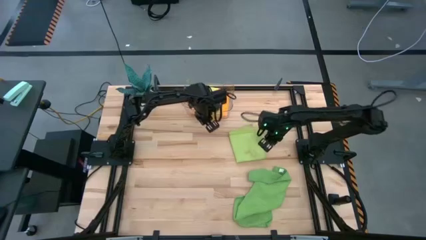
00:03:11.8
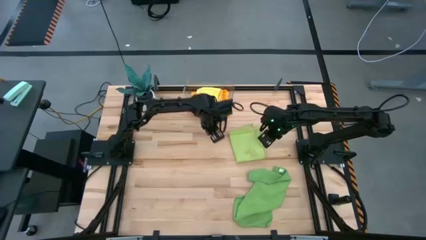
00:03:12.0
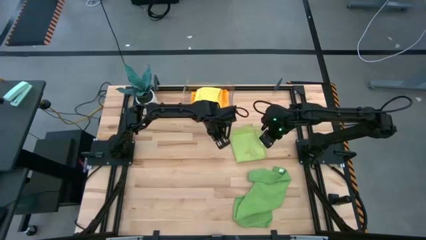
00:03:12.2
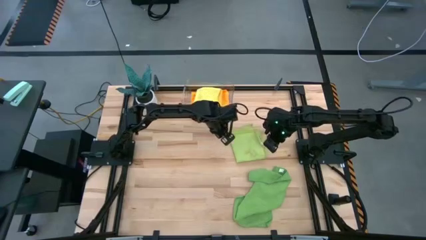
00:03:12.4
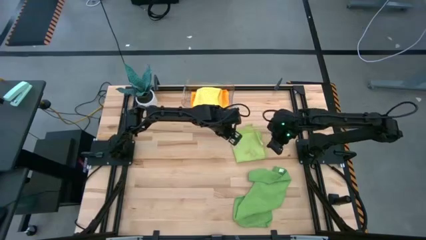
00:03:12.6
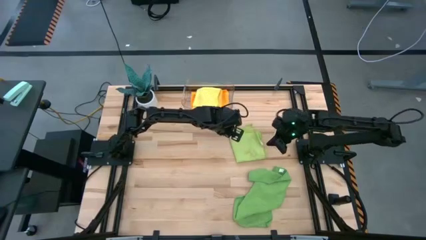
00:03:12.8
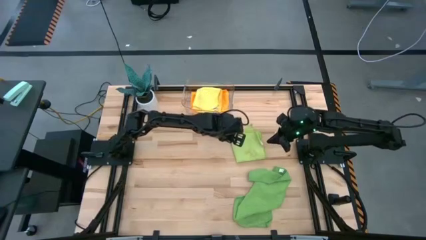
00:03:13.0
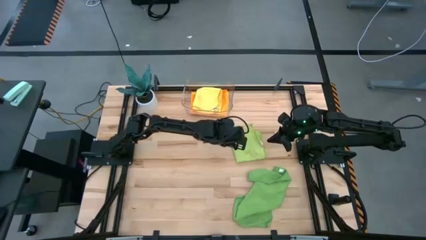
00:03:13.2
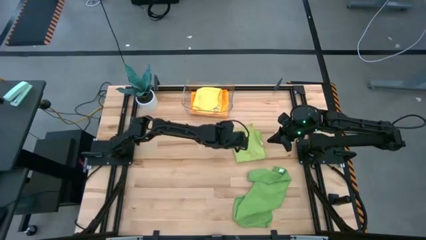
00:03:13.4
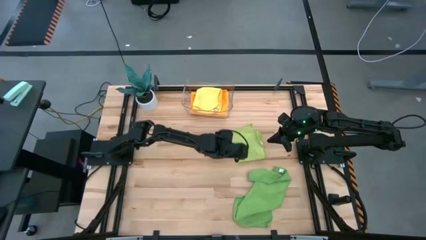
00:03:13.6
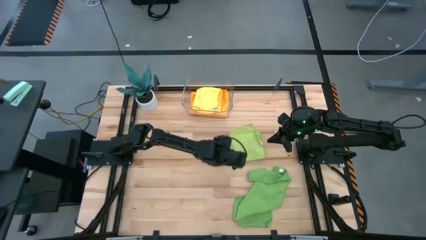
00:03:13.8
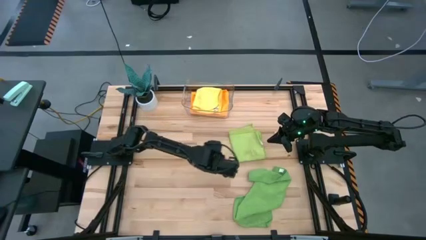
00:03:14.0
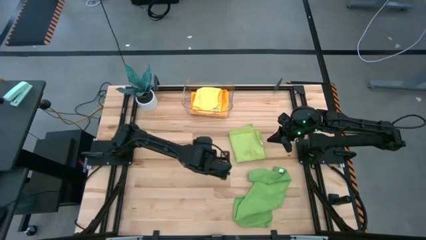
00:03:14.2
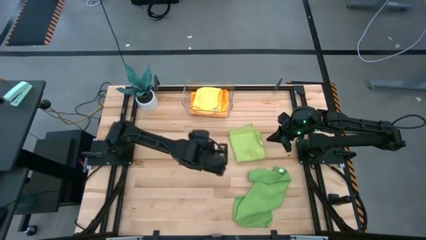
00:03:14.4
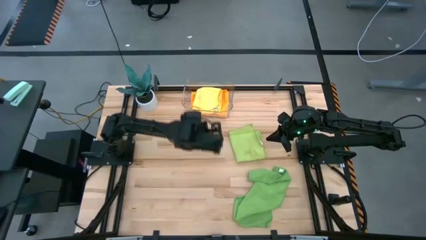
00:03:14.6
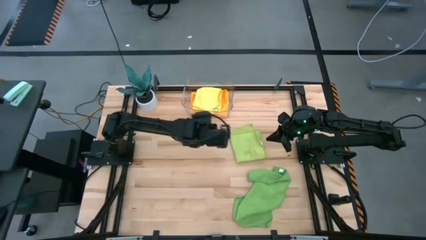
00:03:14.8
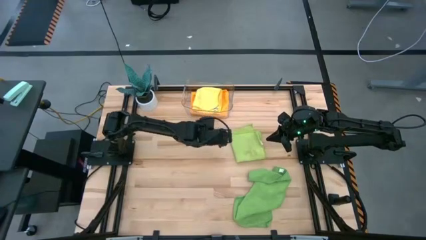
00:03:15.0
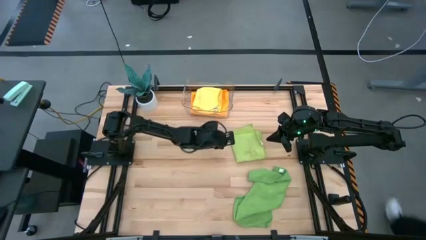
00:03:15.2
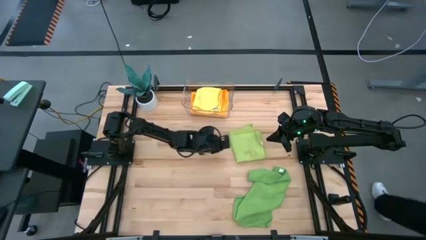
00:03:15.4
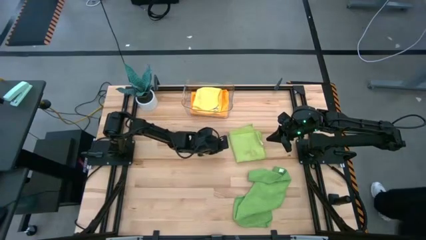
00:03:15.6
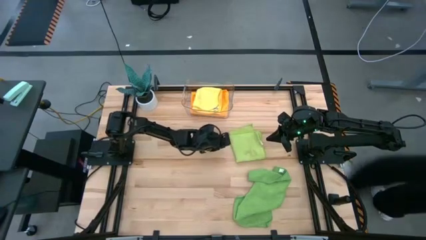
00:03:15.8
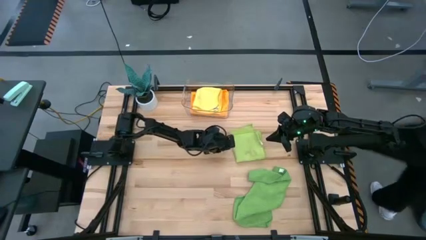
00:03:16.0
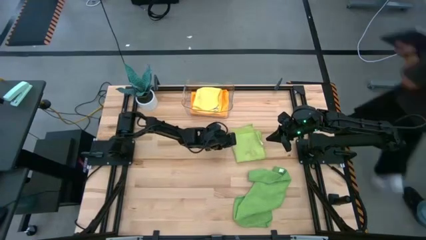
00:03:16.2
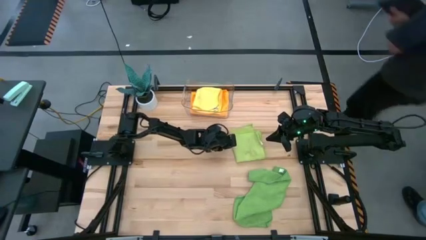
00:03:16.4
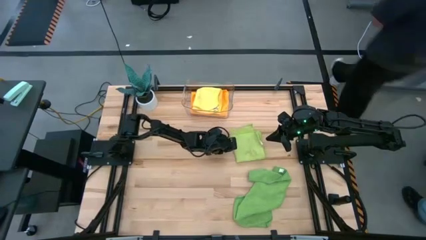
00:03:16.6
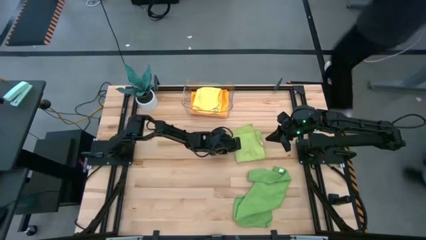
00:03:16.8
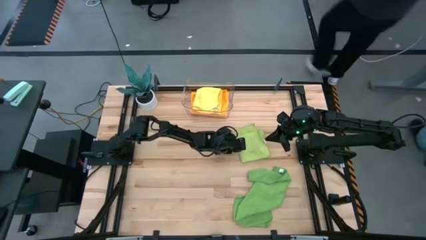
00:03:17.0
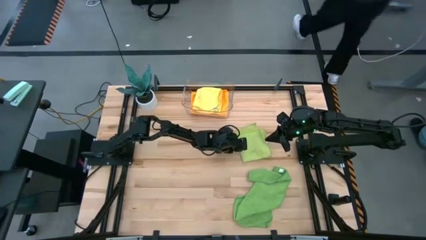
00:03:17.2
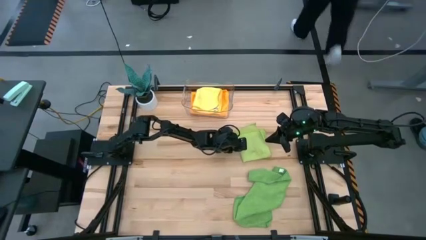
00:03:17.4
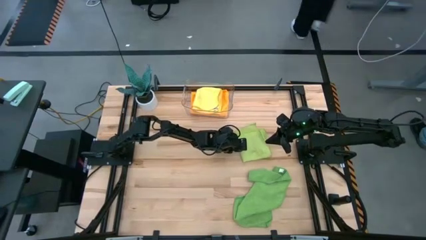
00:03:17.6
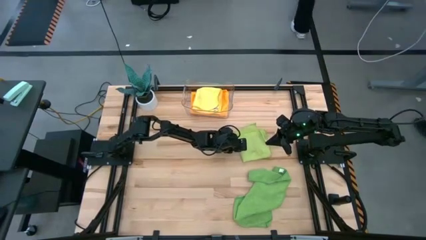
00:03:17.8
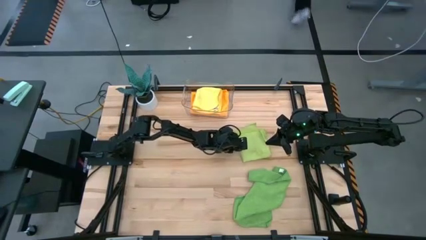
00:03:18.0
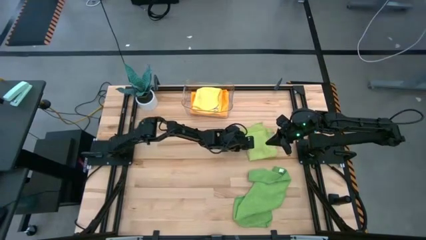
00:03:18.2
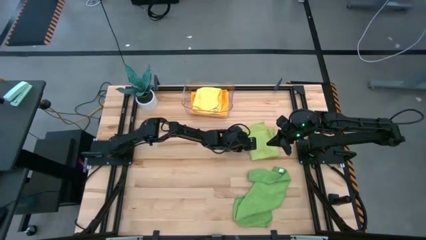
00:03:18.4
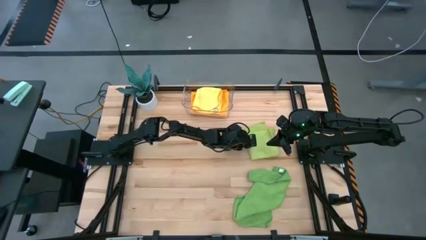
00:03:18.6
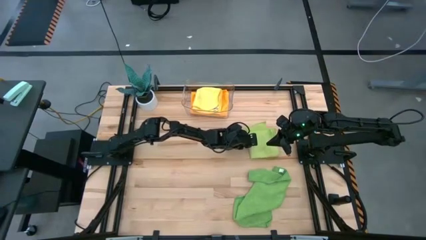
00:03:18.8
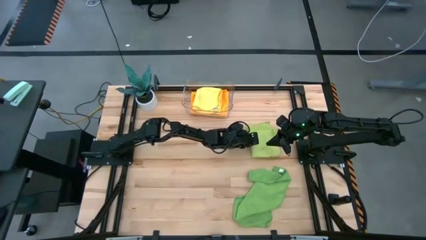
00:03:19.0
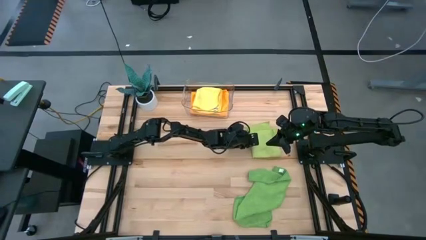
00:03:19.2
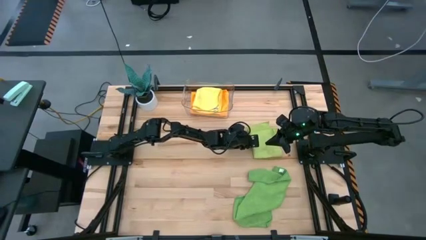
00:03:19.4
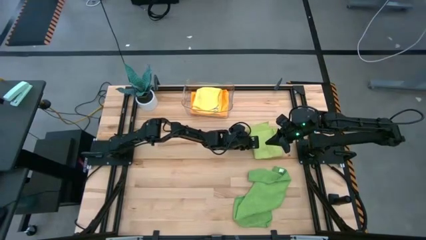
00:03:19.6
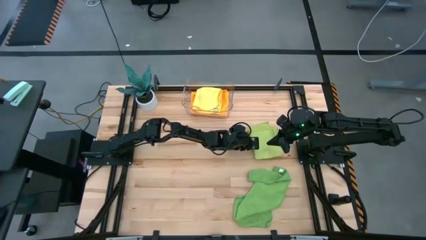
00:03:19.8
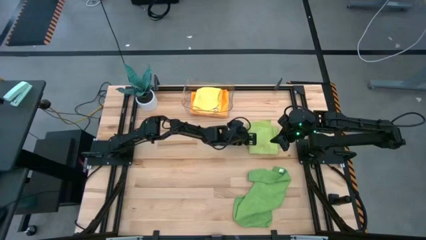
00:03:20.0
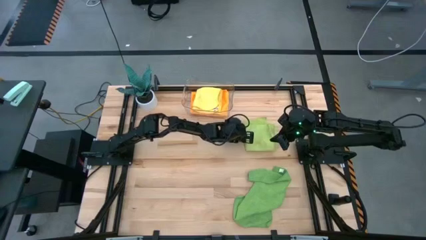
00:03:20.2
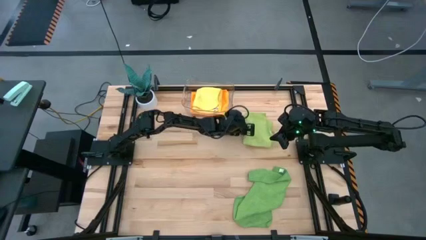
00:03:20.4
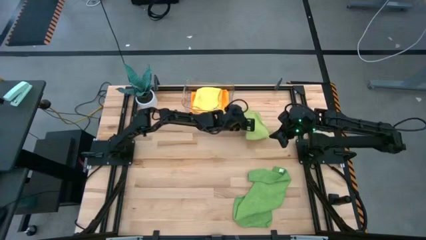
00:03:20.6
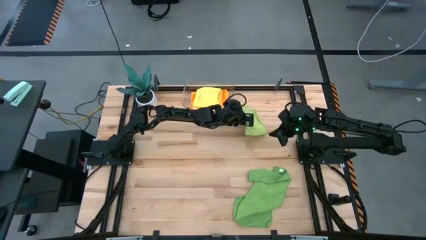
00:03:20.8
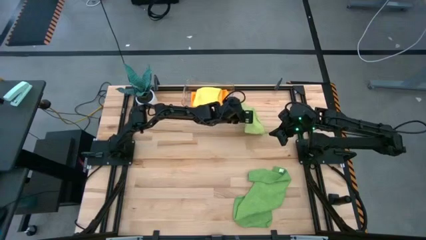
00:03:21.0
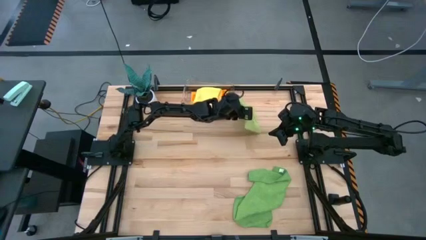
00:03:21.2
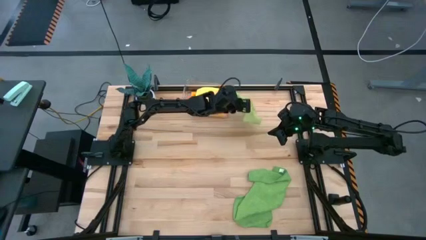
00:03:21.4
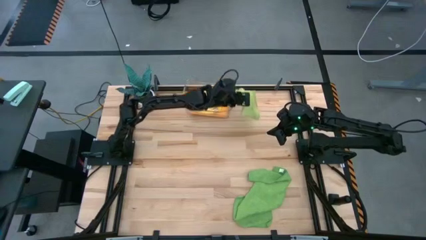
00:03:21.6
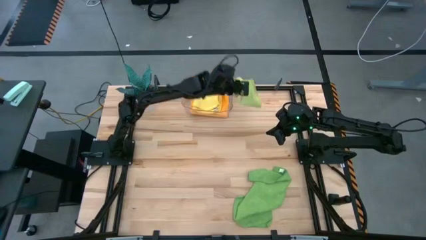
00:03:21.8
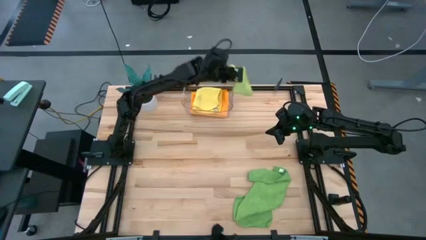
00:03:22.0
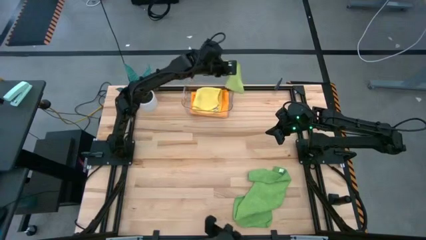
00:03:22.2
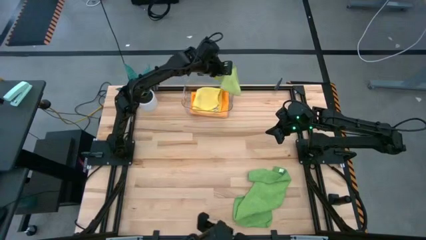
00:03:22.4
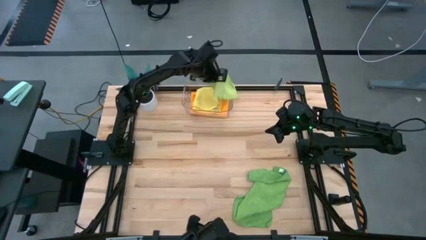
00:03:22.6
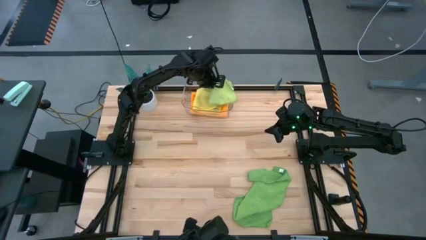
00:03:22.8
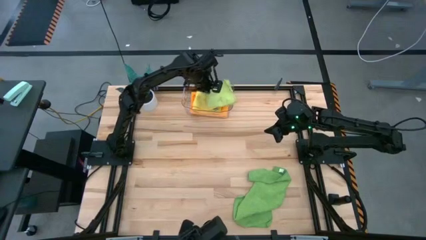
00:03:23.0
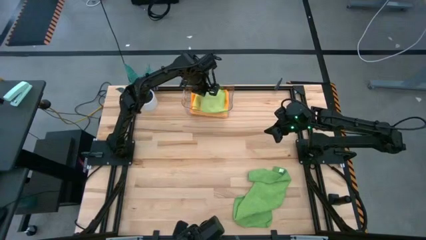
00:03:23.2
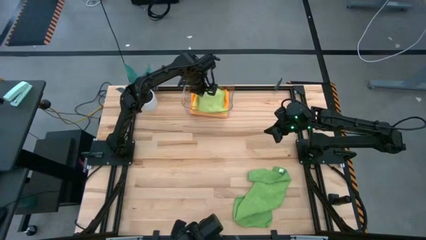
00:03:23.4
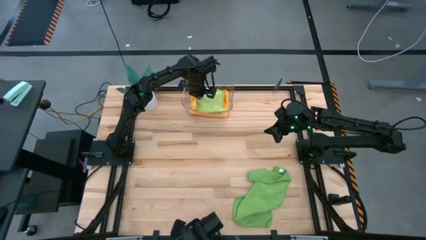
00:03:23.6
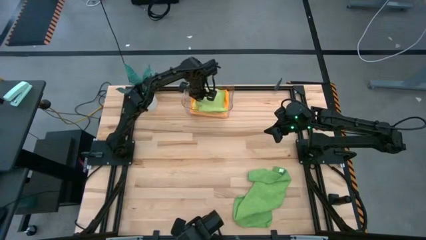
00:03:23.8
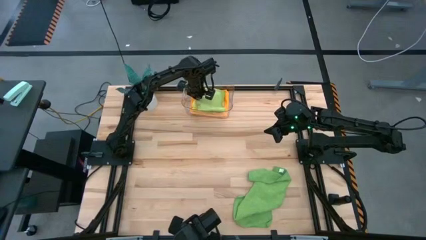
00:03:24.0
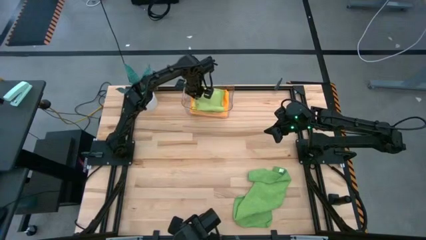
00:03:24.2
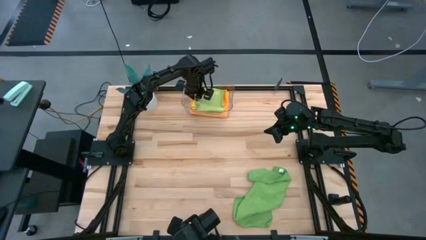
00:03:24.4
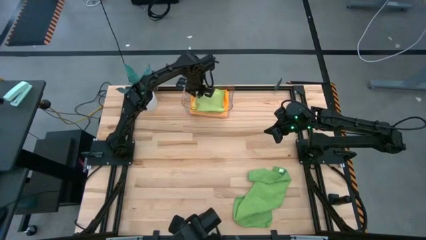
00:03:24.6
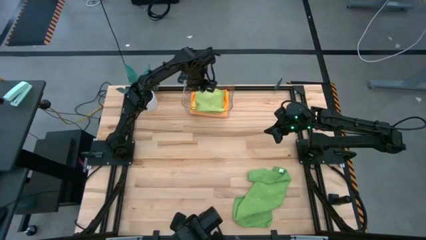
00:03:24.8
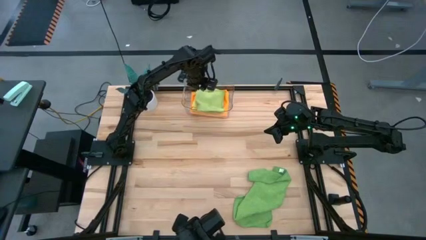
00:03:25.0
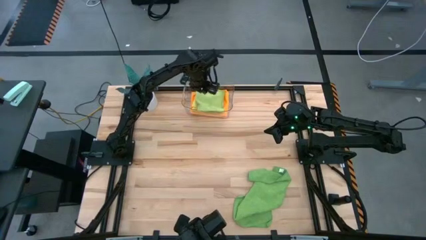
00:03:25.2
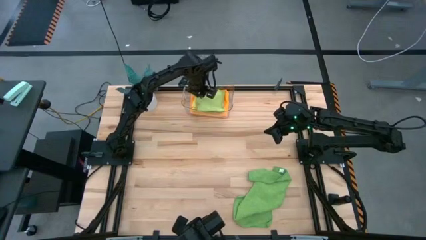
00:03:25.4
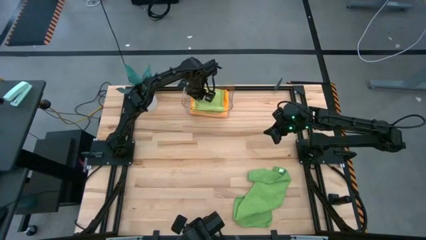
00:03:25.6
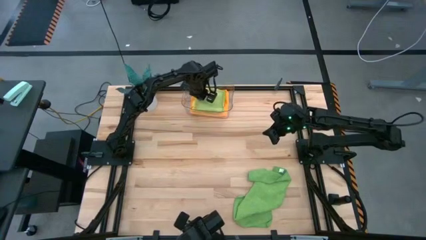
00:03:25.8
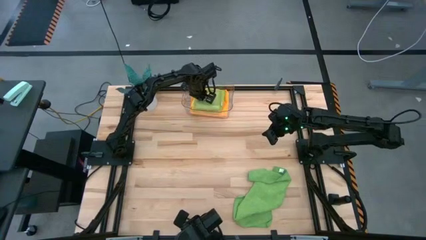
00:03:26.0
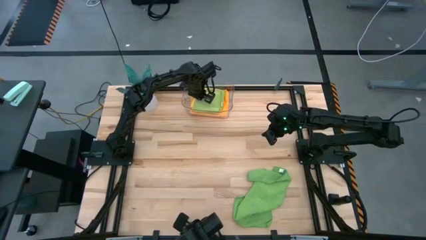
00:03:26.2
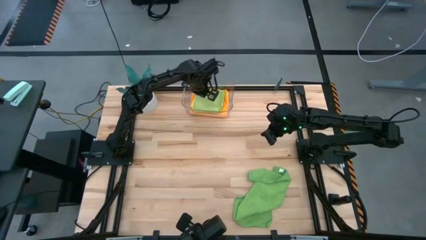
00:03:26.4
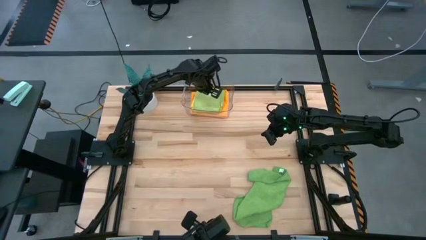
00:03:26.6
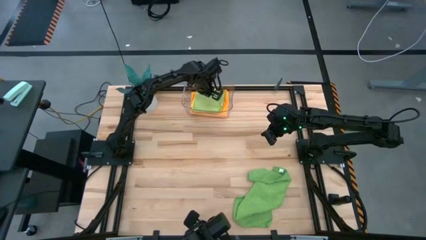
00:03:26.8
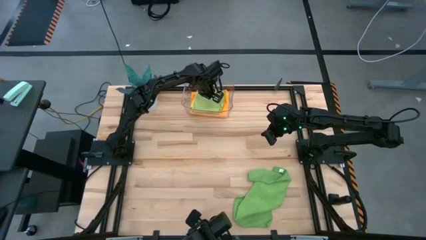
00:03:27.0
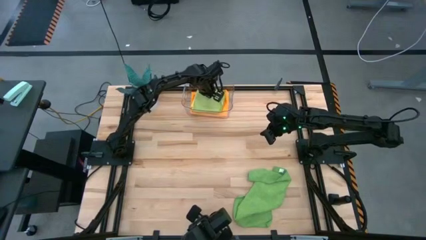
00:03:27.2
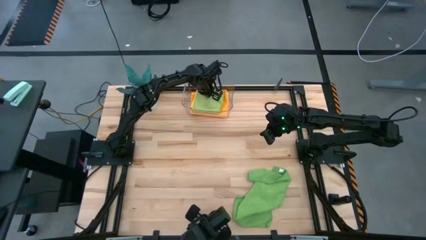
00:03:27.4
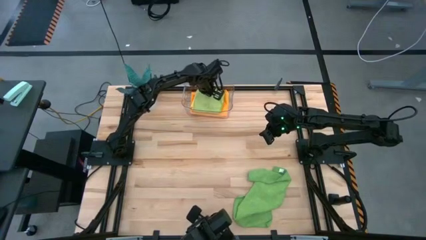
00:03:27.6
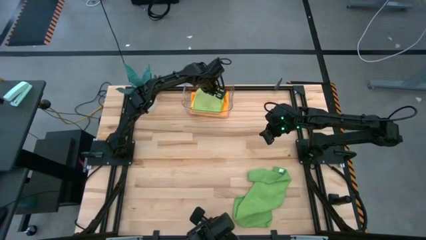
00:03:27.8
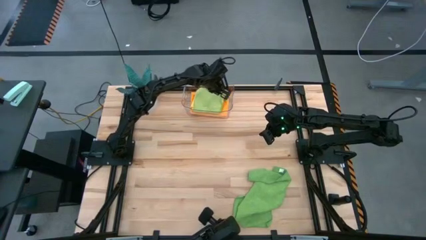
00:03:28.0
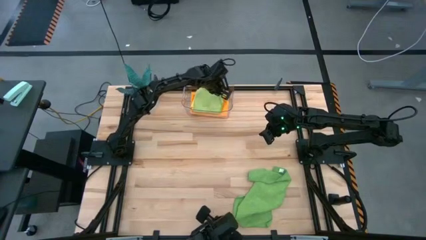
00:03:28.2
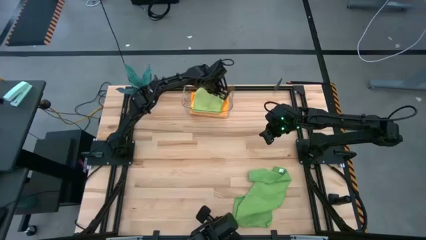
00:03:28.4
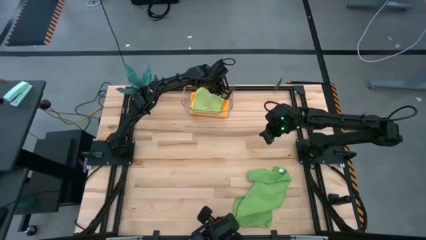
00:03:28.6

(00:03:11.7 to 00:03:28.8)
Task: Fold microfiber towels
Put the light green towel into the transparent bin
